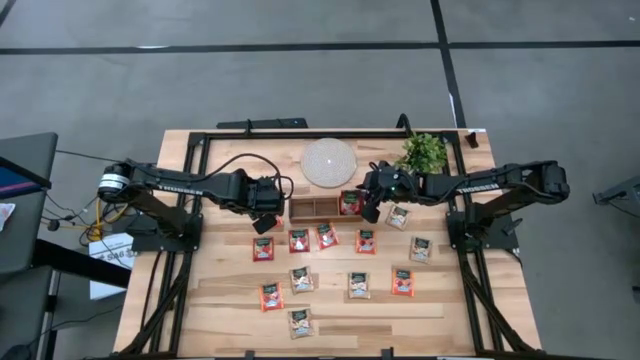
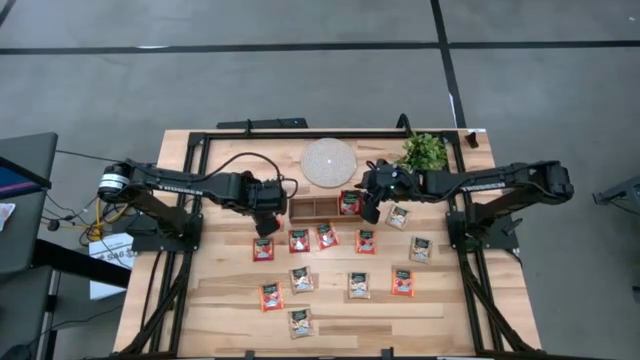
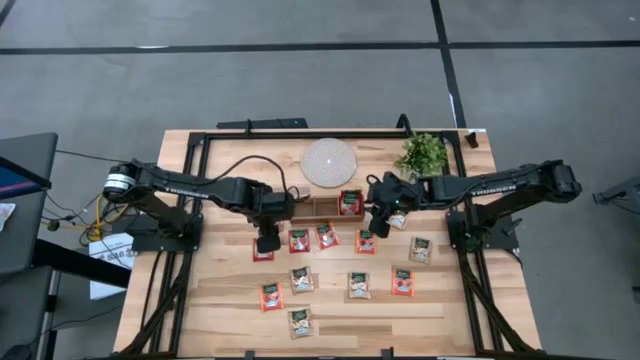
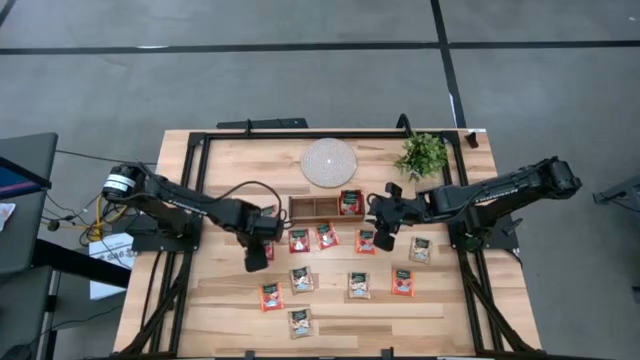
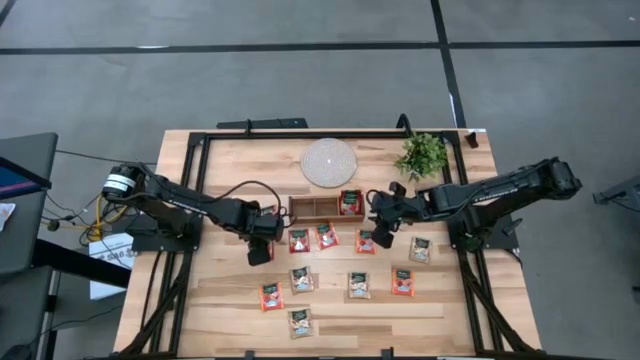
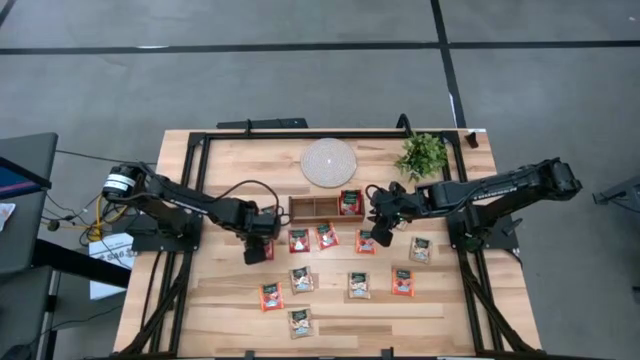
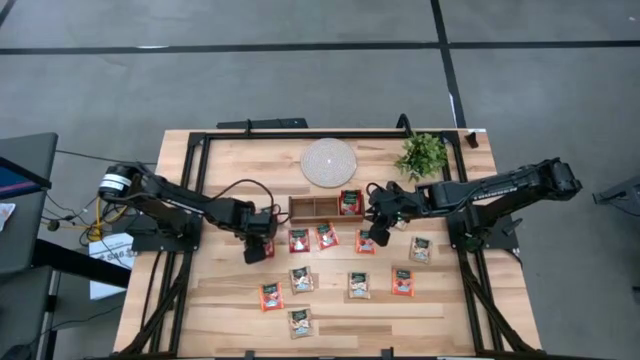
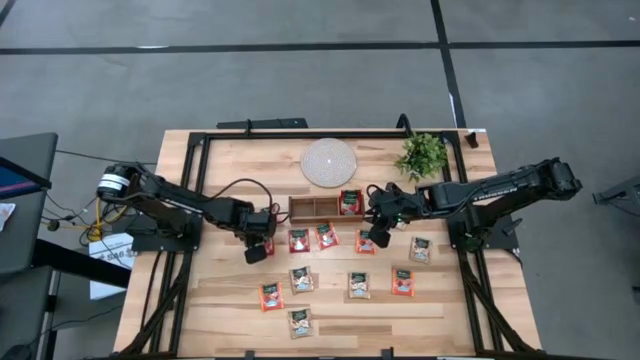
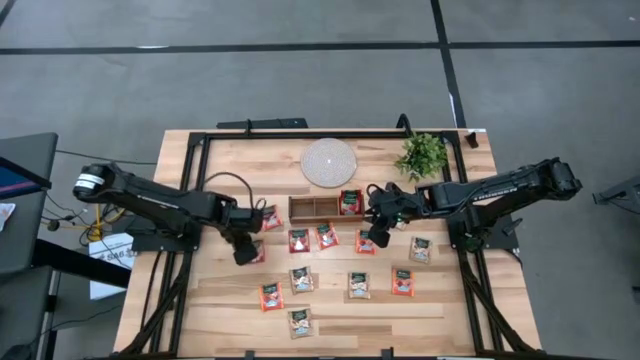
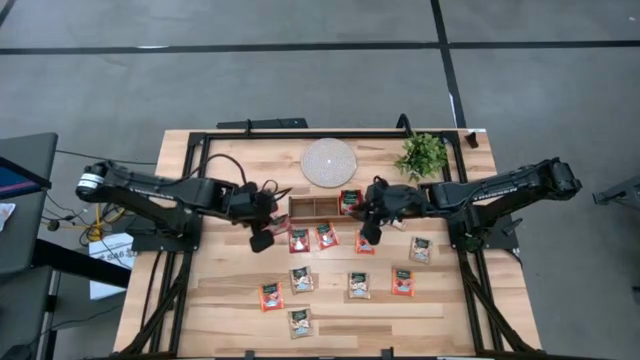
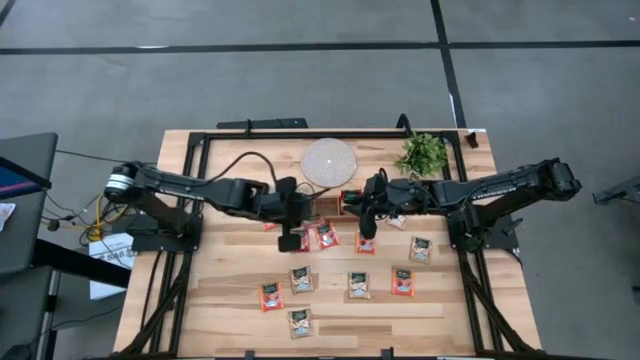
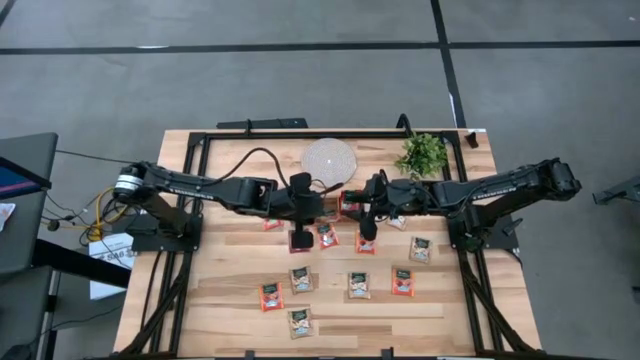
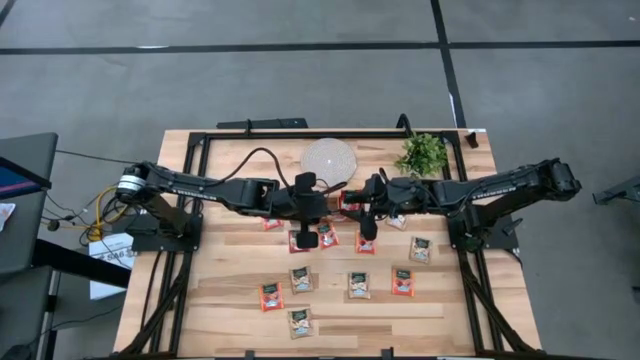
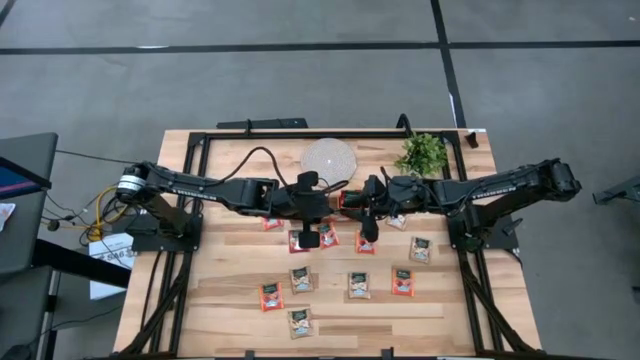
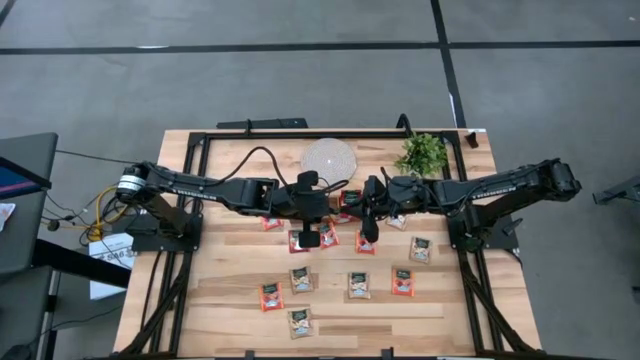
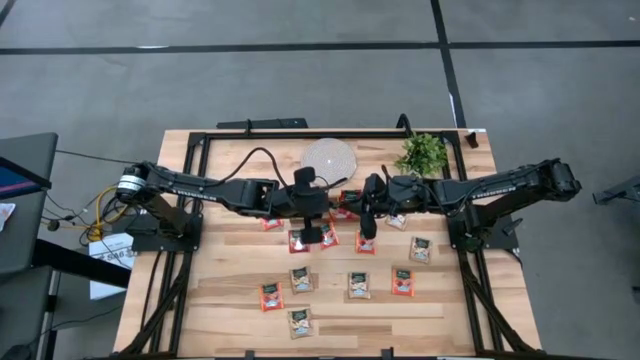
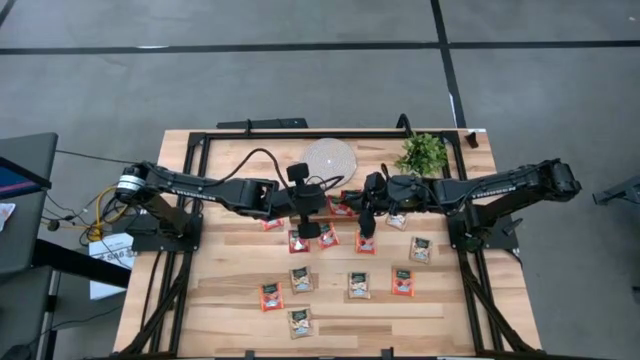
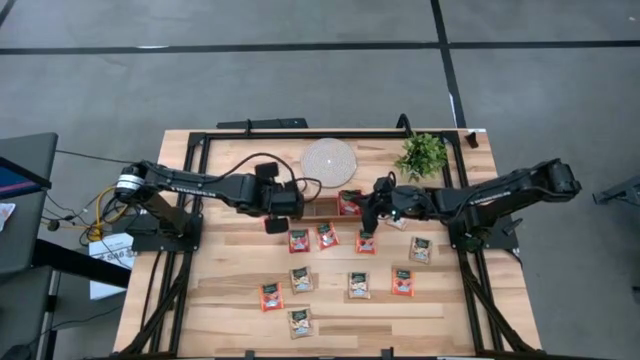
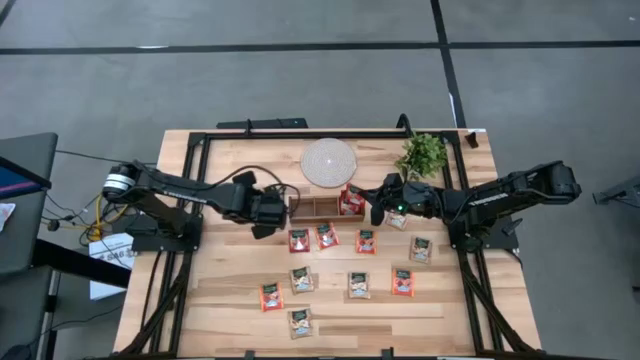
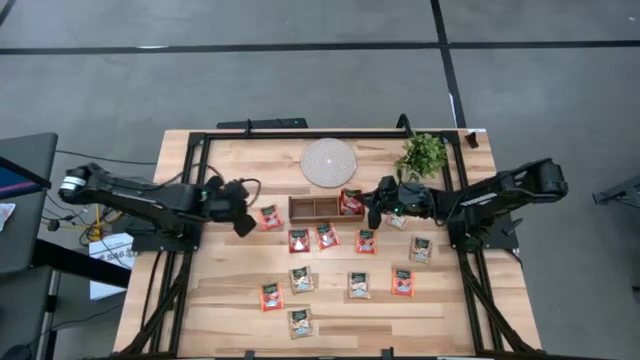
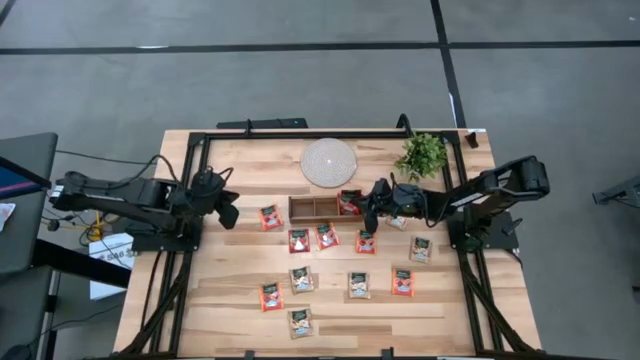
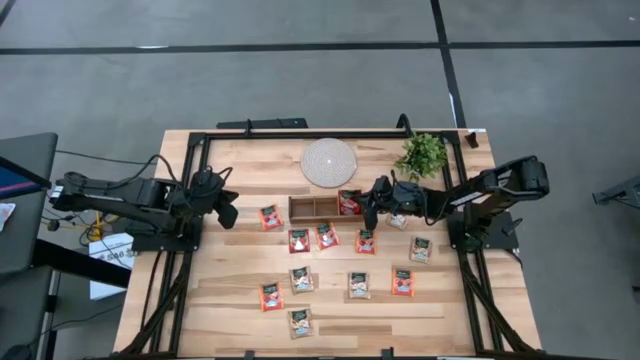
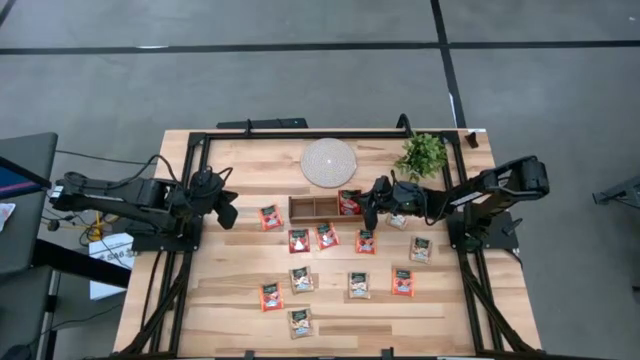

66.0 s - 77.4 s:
Task: Pick & Place Tea
Put the left red tea bag into the right slot of the wooden organizer

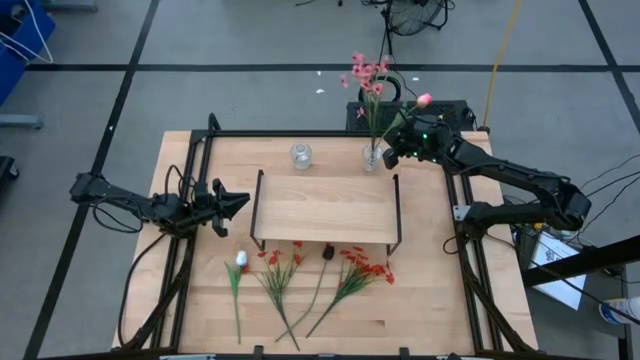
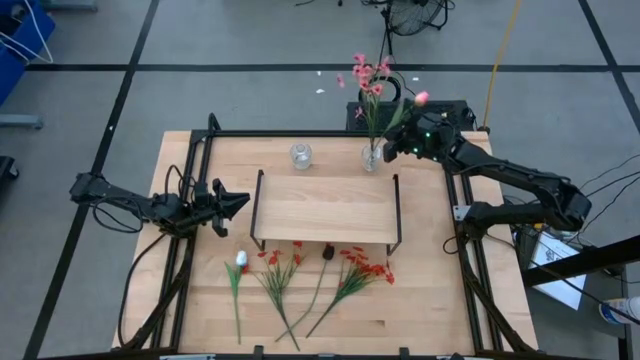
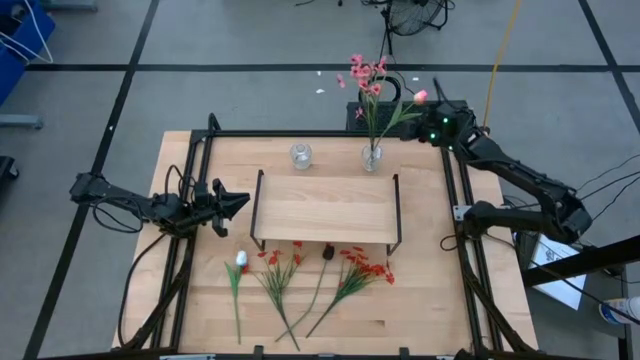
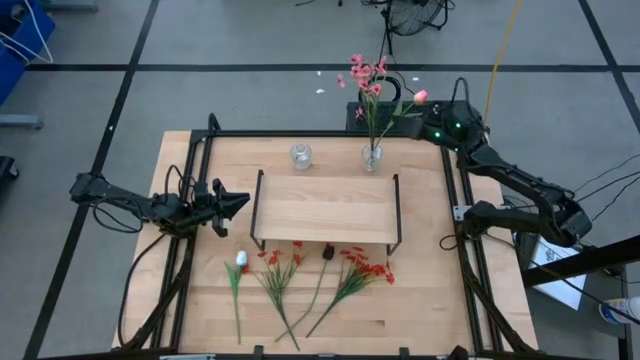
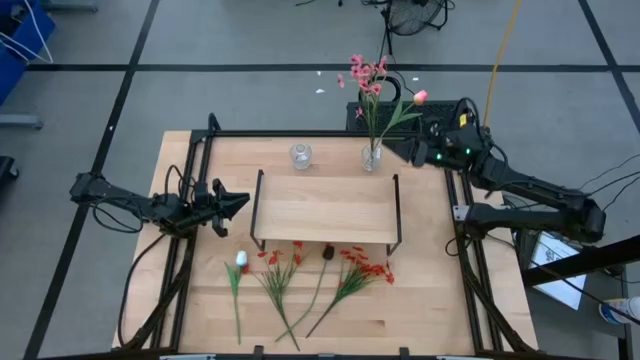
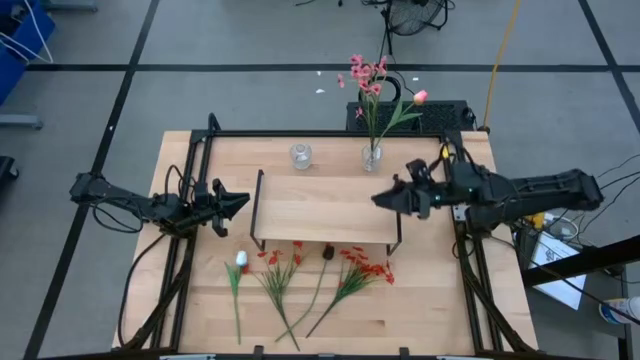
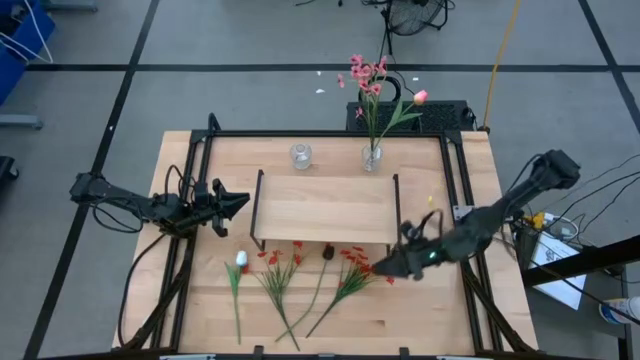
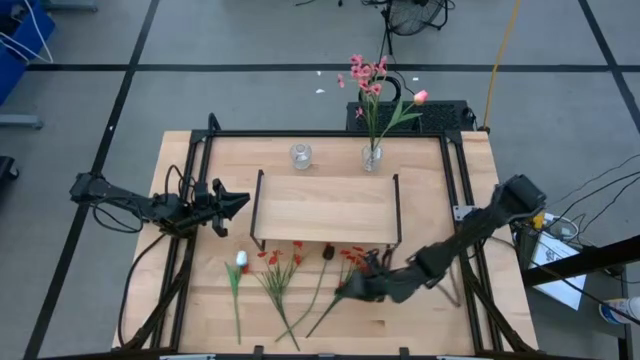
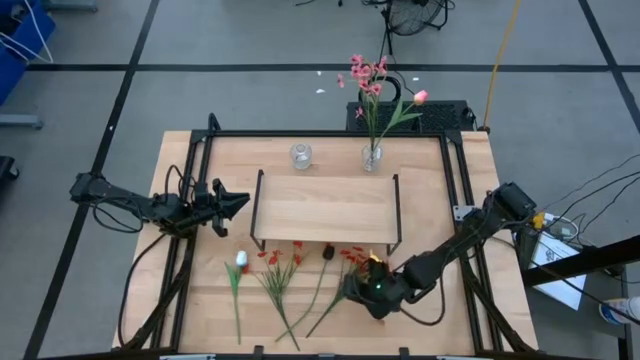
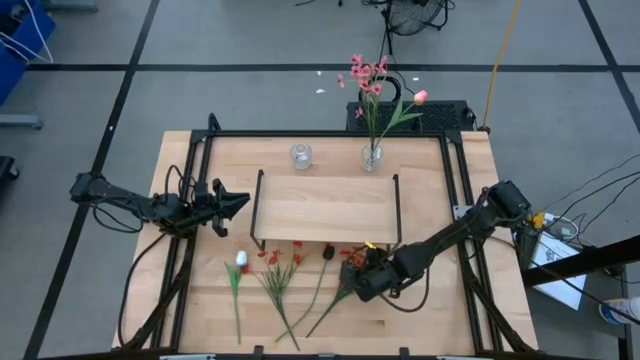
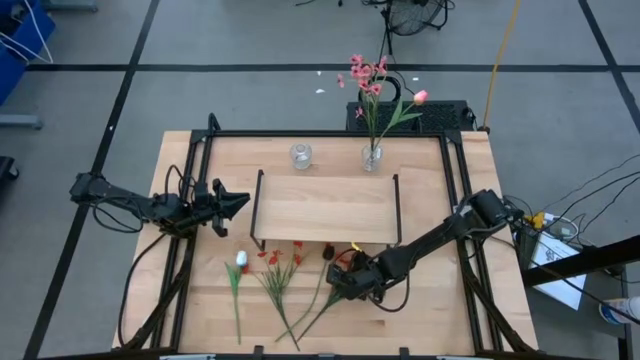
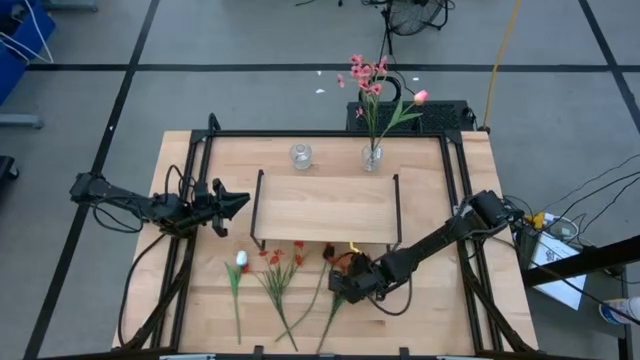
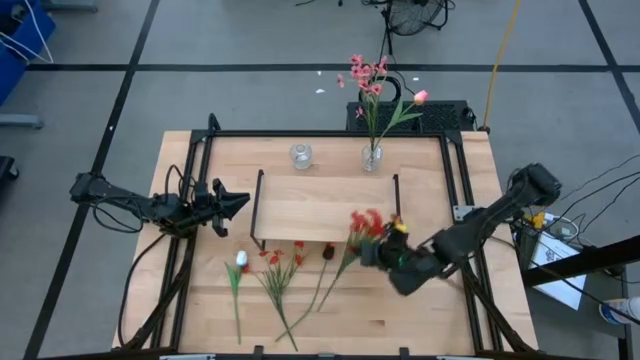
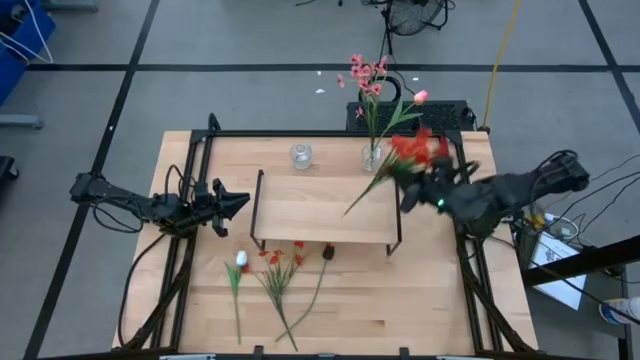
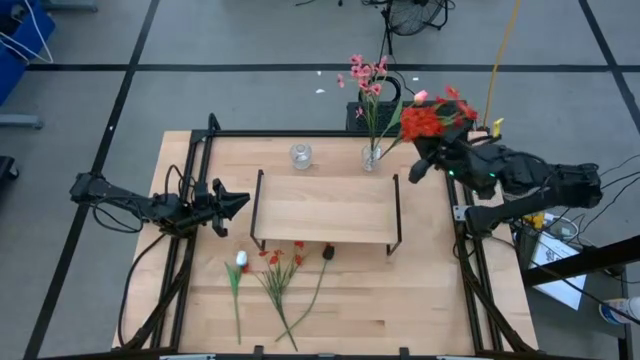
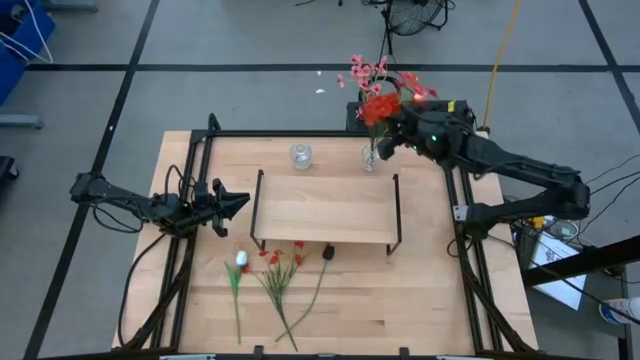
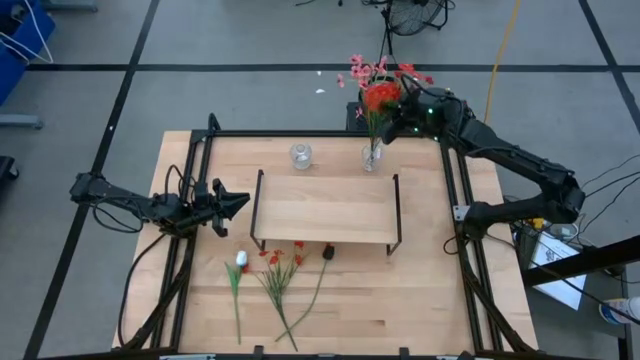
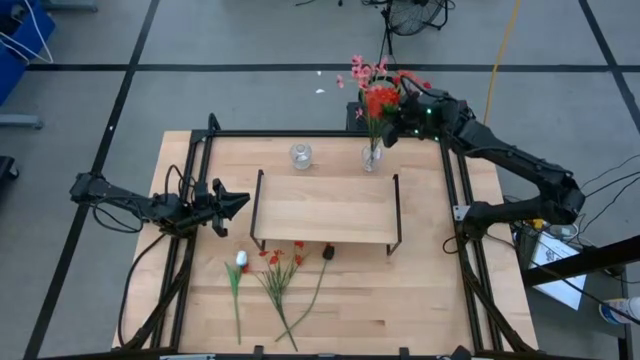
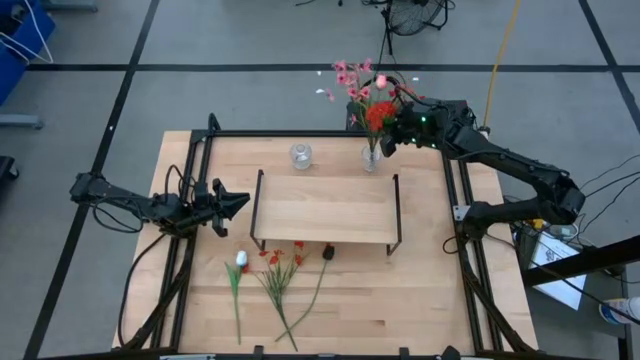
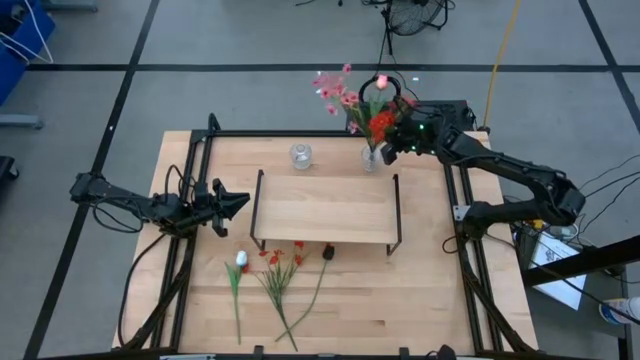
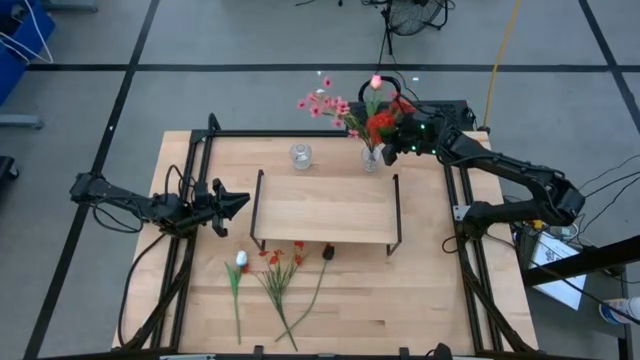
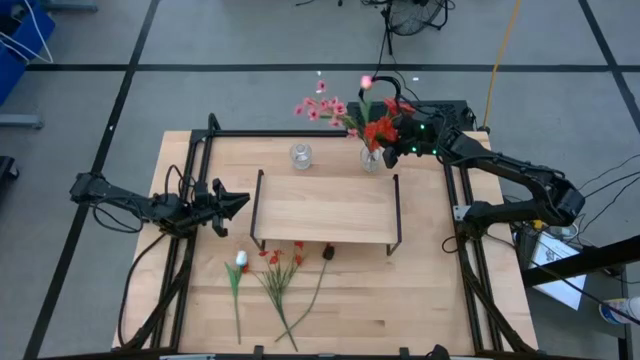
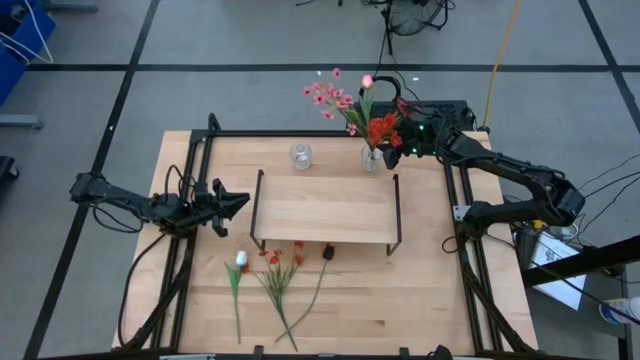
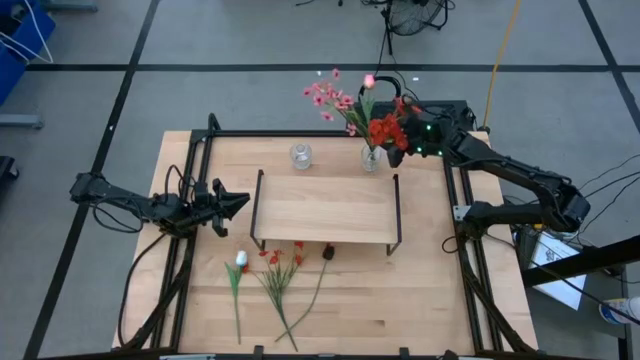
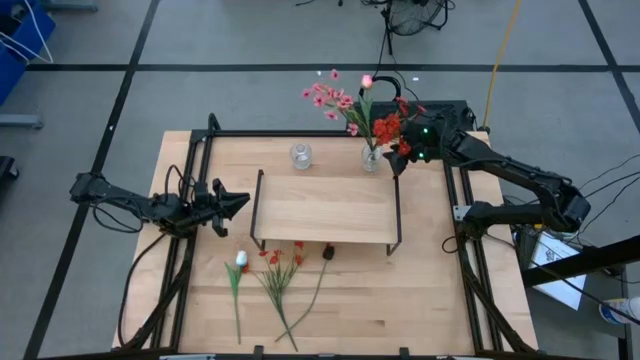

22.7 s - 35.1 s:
Task: Pick and place flowers into a vace then onto a shelf
Put the right orange flowers into the right transparent flower vase
